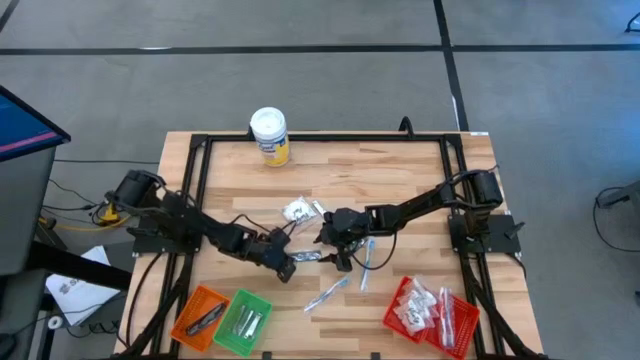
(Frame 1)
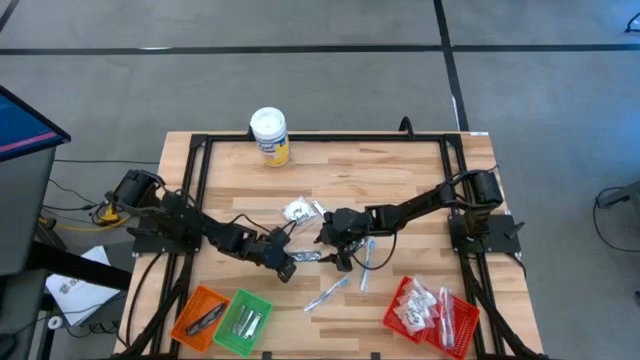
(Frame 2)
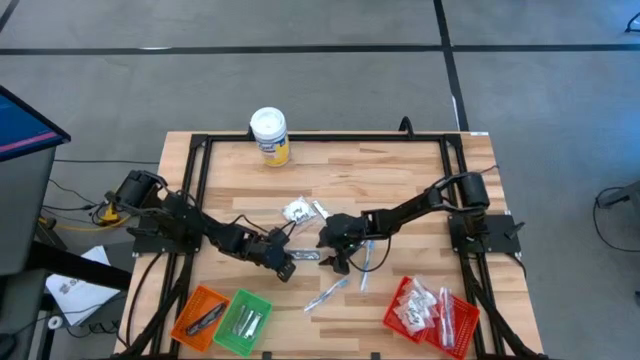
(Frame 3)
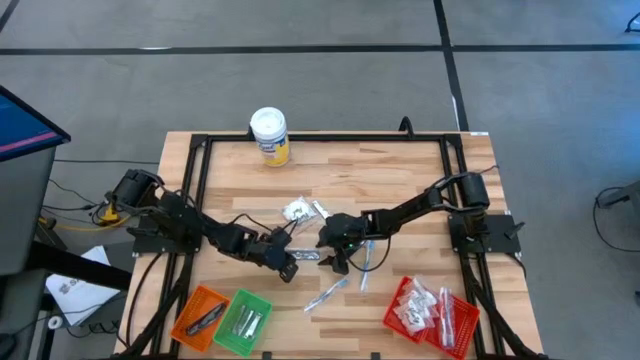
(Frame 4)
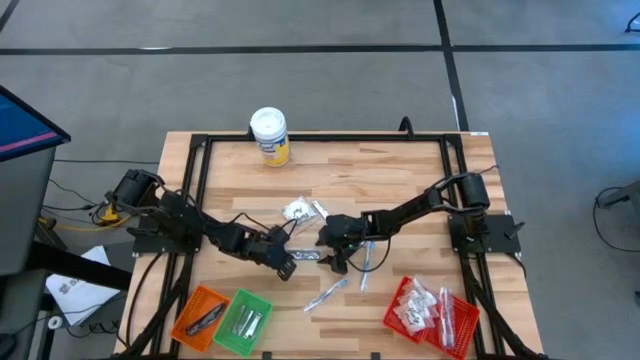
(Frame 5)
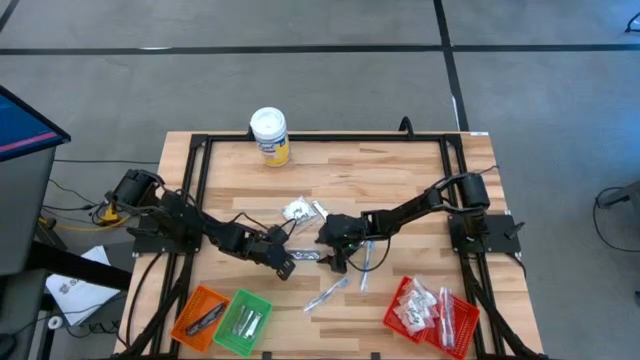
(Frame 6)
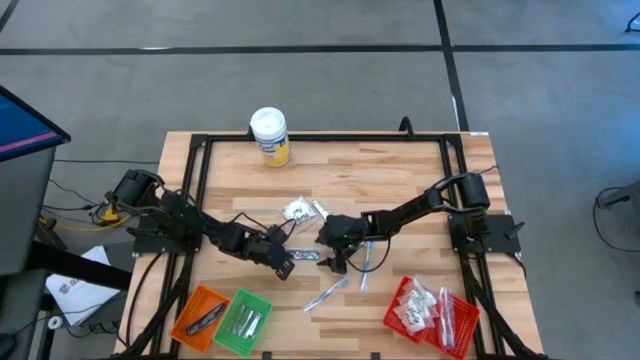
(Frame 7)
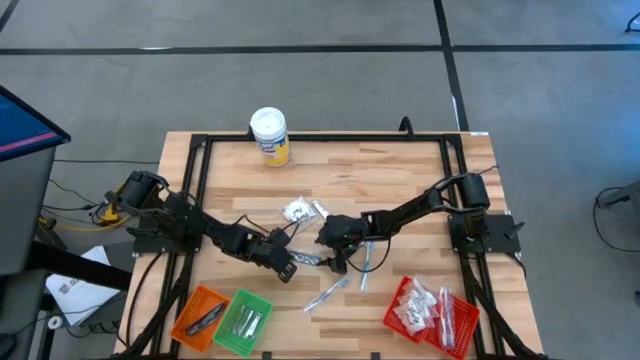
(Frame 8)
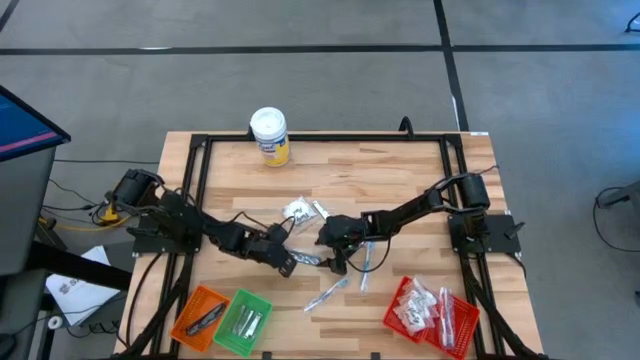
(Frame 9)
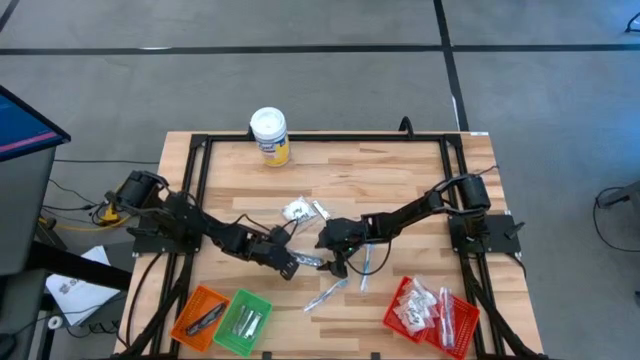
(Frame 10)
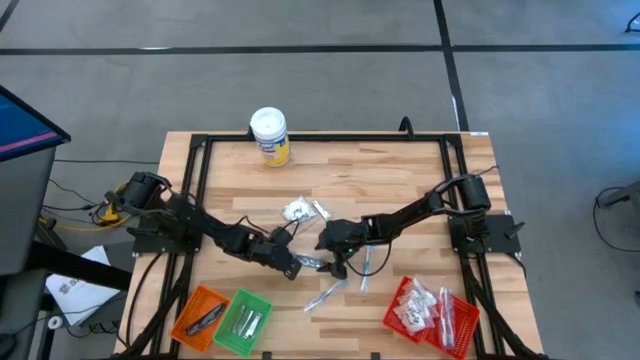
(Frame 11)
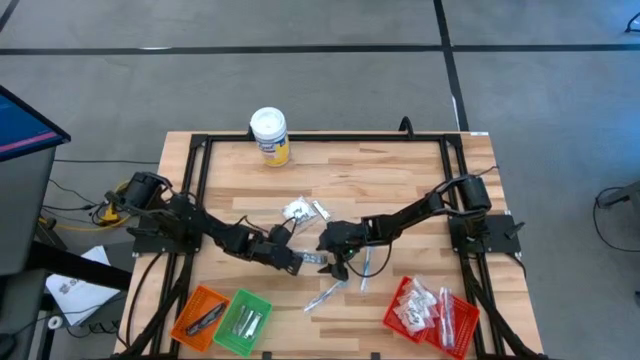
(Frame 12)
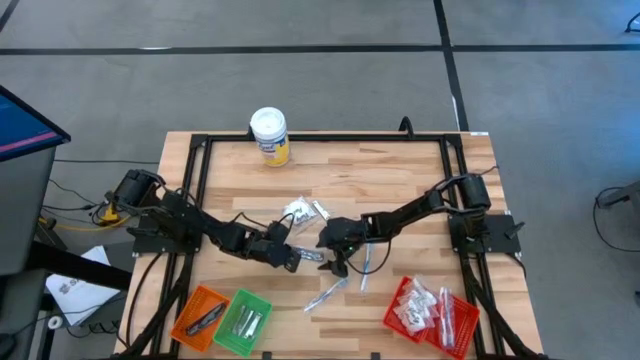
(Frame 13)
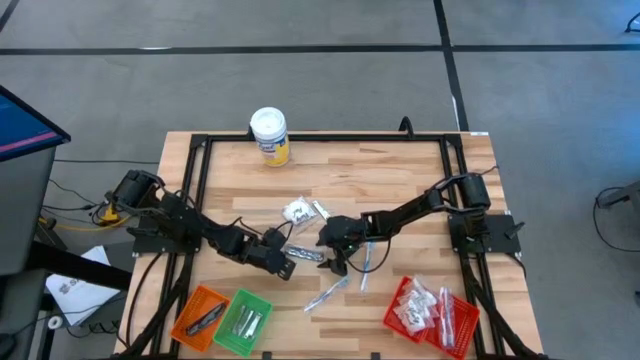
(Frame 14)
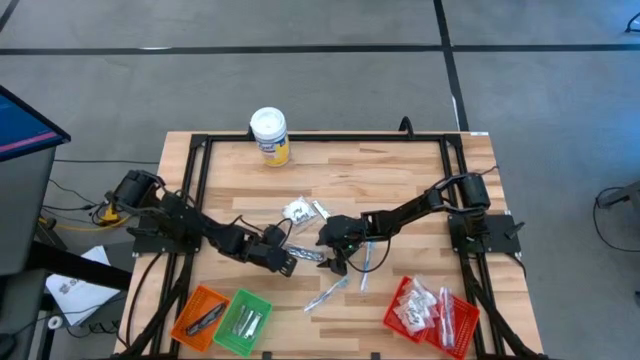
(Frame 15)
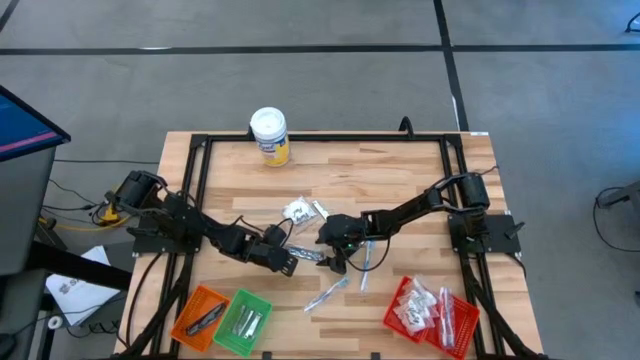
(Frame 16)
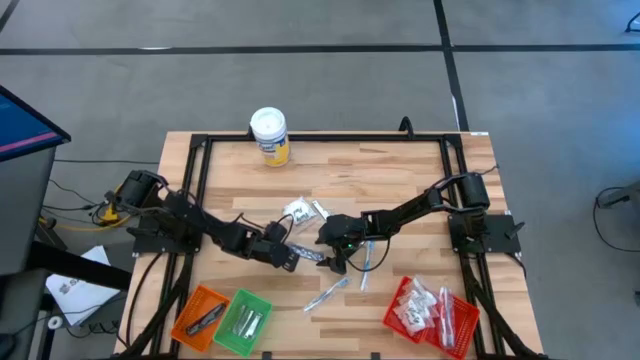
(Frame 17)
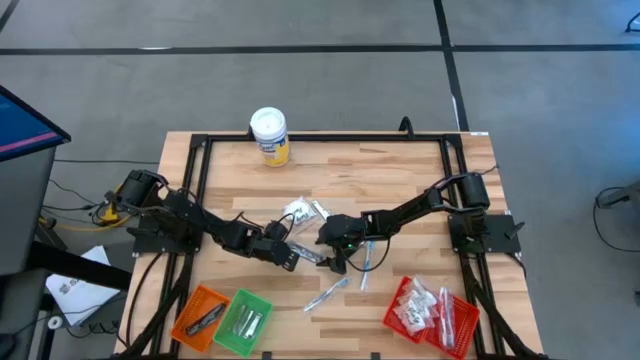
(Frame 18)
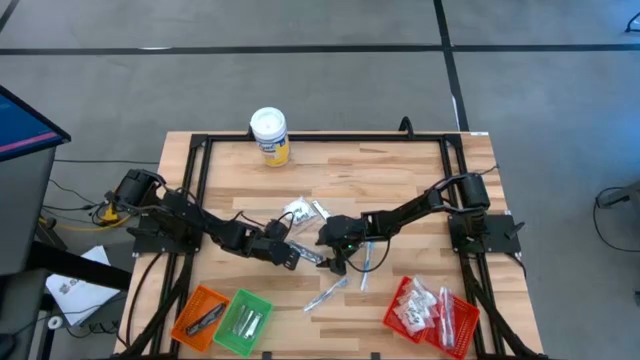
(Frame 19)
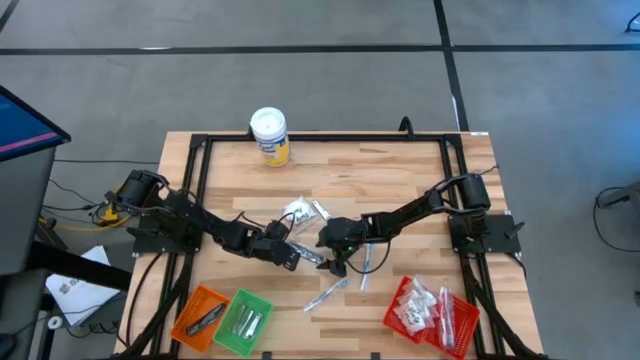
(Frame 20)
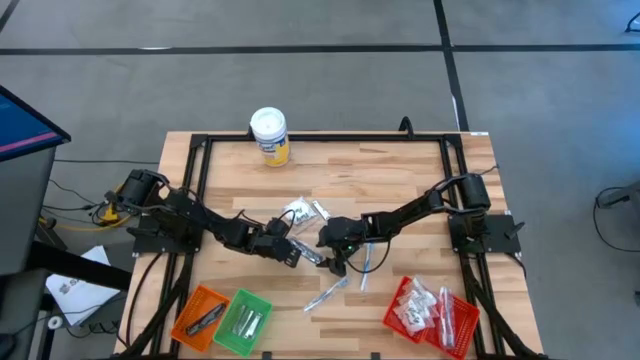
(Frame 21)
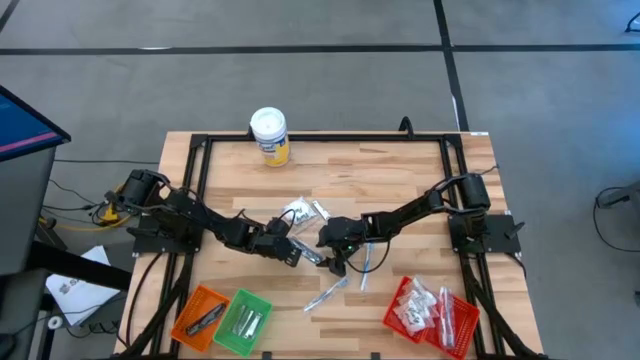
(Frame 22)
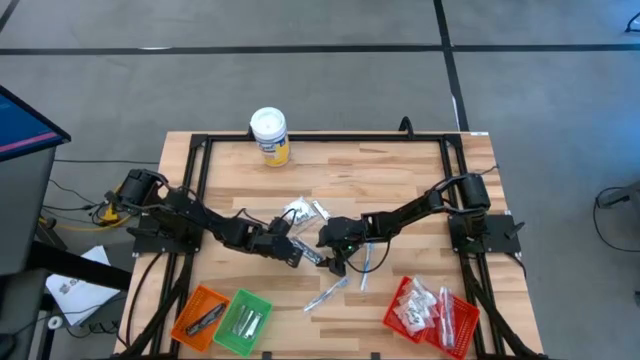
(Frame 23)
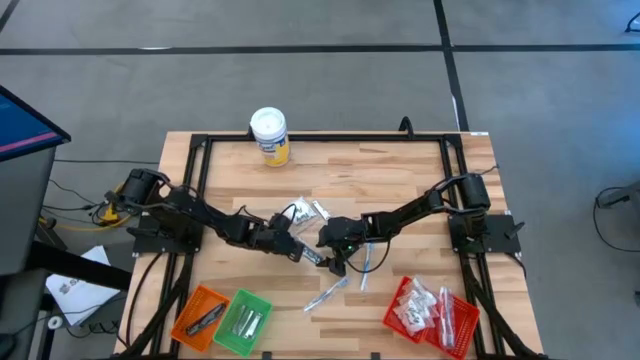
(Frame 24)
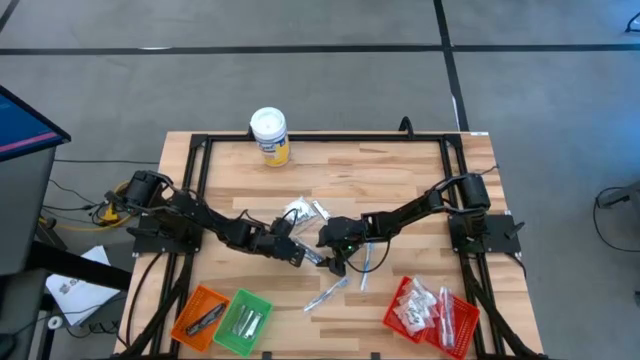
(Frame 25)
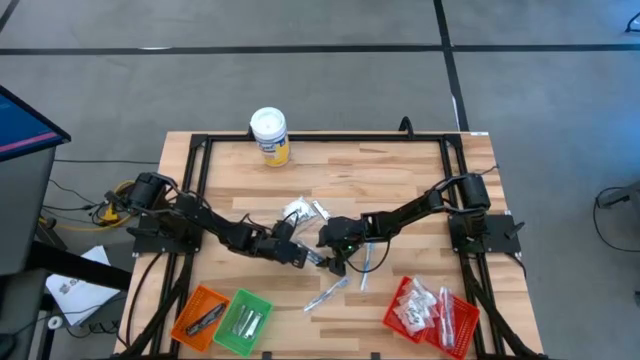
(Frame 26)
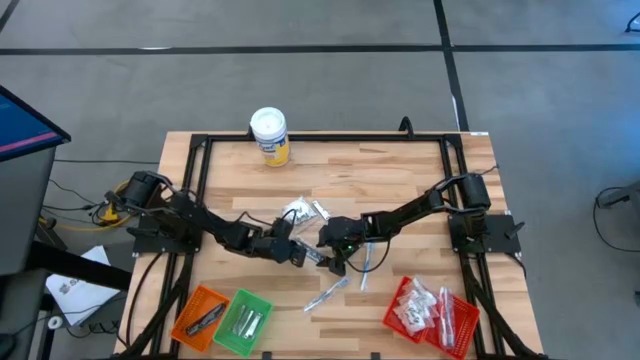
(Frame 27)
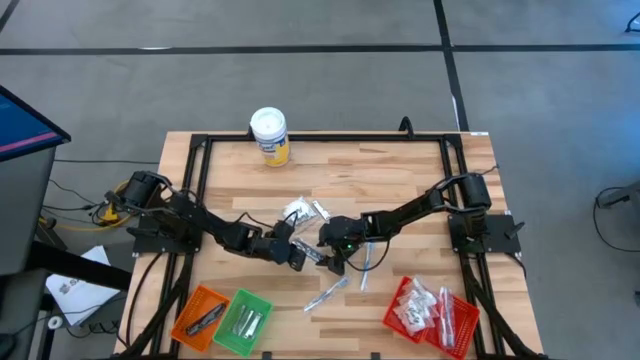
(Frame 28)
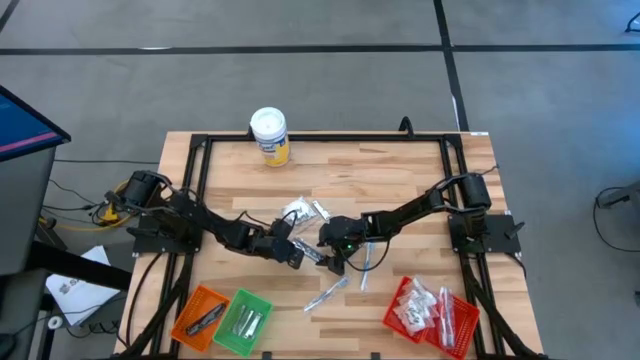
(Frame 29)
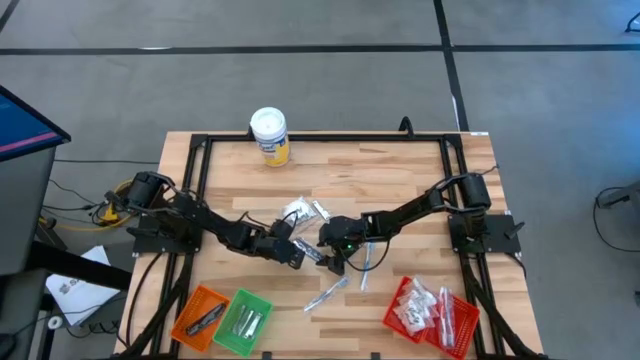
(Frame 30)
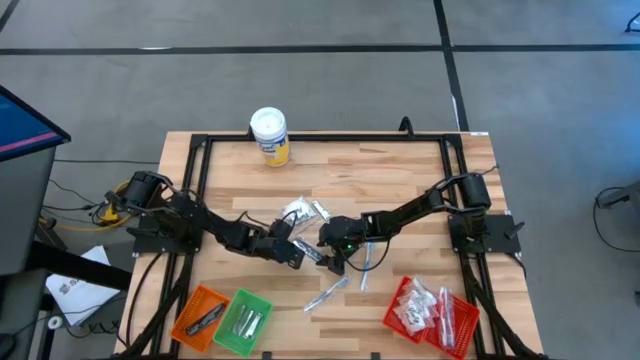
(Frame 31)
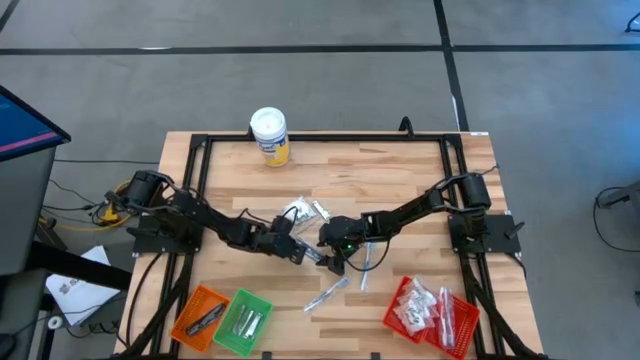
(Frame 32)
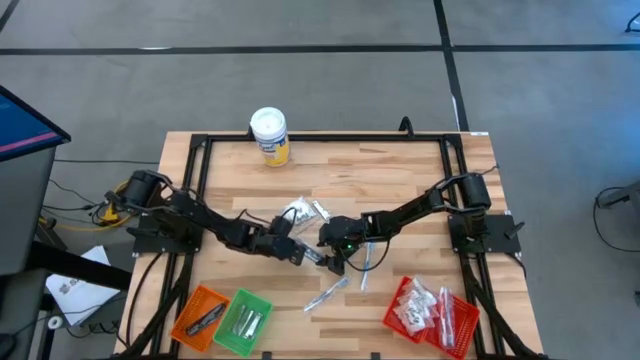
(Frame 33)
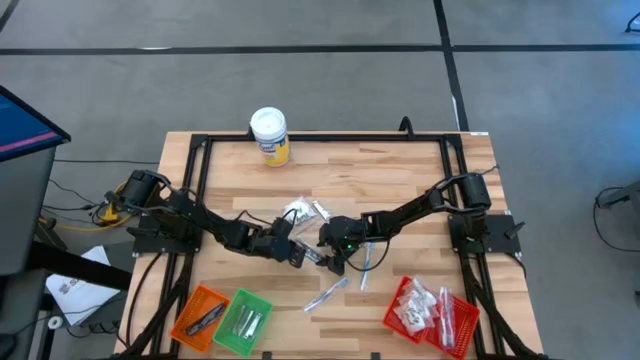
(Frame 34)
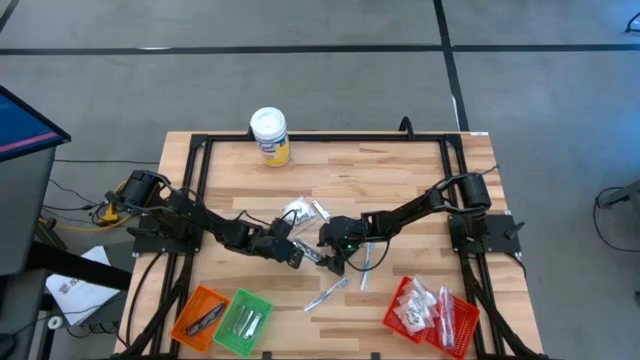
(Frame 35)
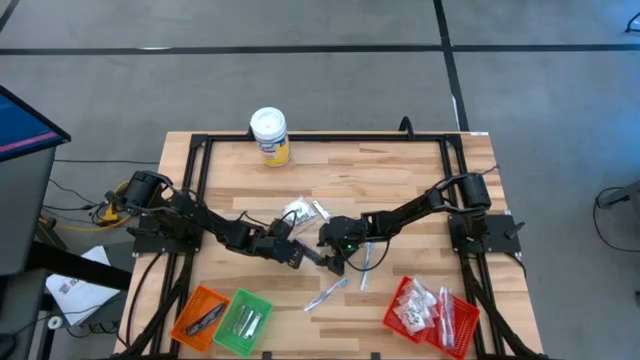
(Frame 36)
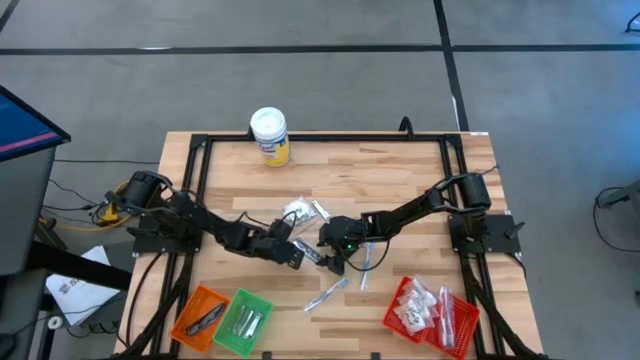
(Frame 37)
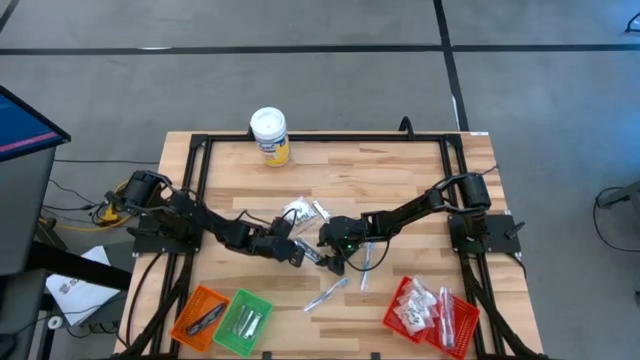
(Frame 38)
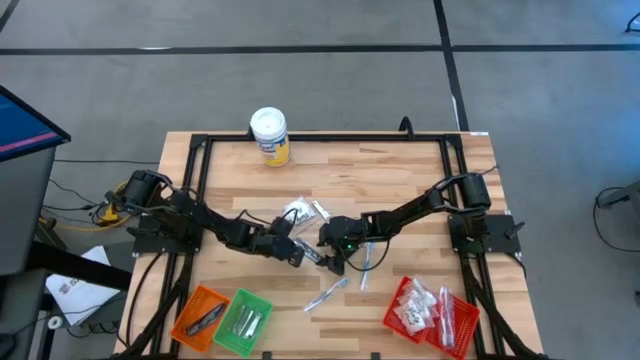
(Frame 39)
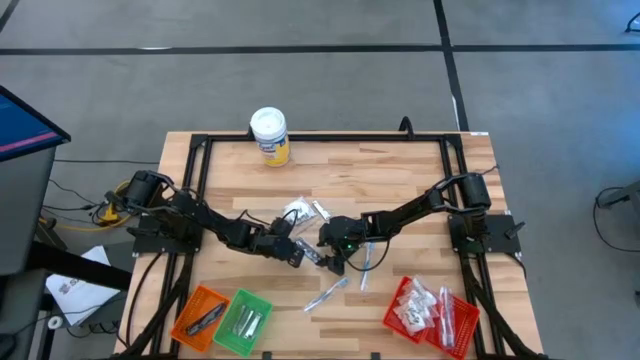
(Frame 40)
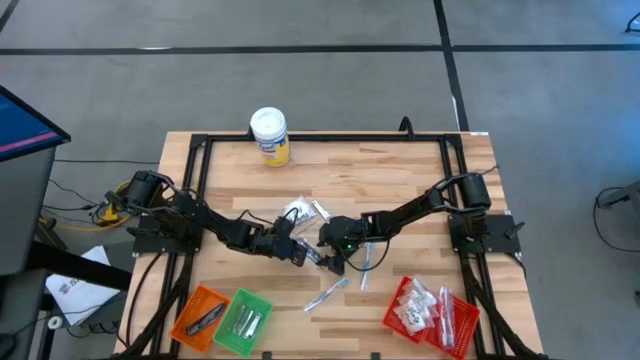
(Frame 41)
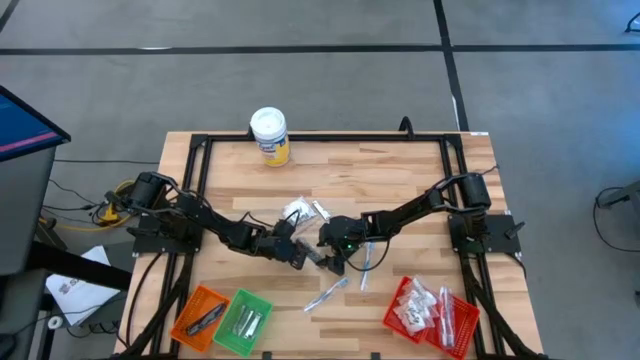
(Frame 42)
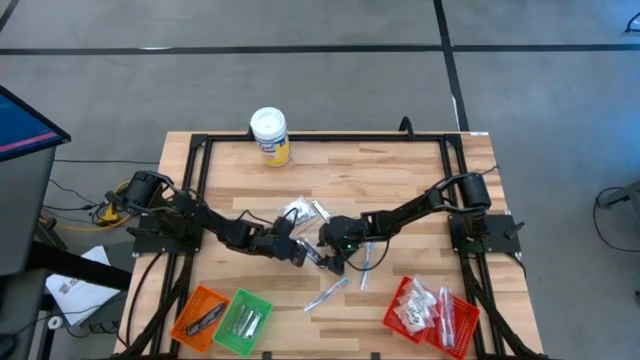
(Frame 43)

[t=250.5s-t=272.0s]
Task: Pick & Place Travel size toiletries
Put the black comb into the orange basket
